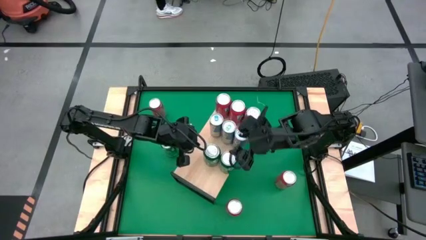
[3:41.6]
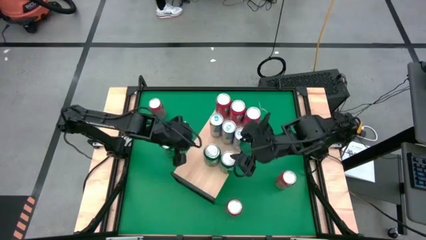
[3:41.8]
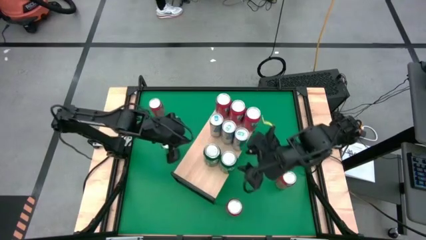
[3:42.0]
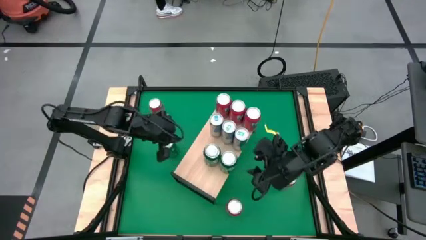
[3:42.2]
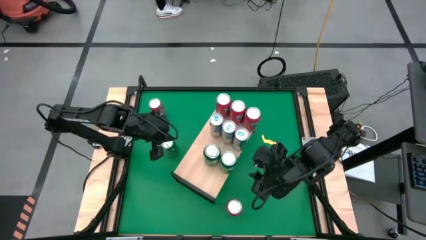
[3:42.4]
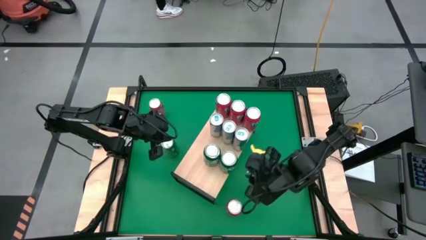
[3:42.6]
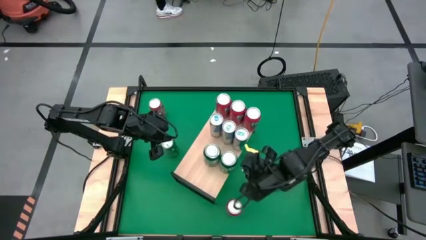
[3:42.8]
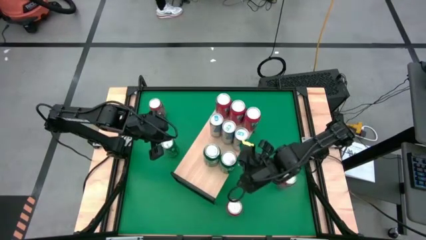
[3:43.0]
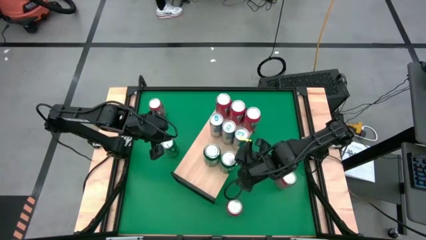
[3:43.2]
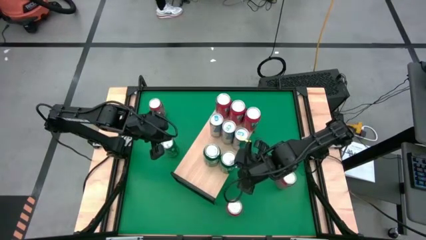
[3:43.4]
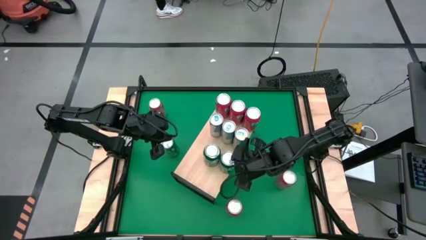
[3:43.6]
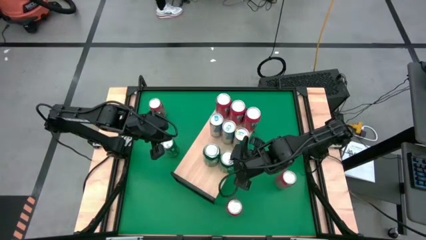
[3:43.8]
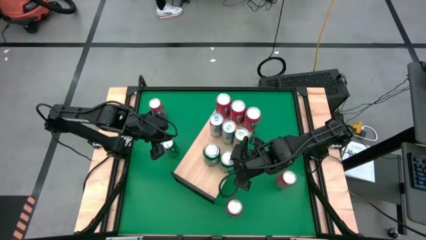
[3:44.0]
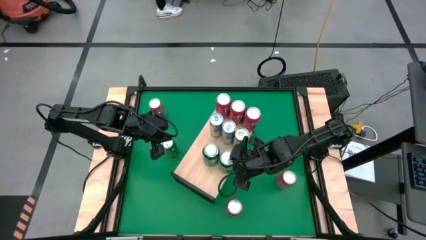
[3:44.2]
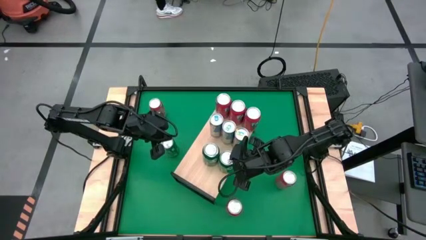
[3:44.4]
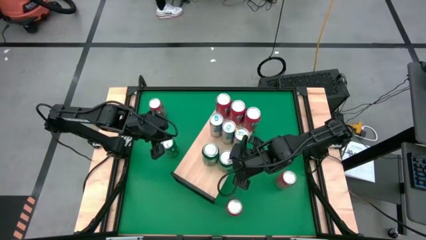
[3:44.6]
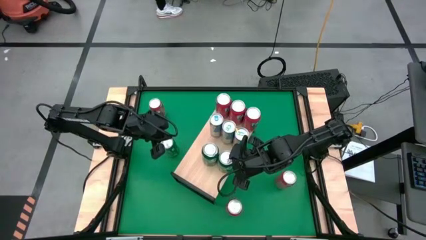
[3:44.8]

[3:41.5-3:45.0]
Task: Sort soda cans
Adjust the green soda cans on the shelf

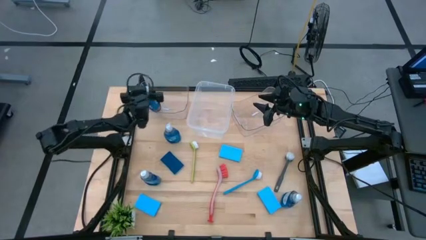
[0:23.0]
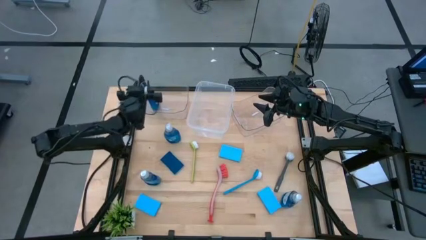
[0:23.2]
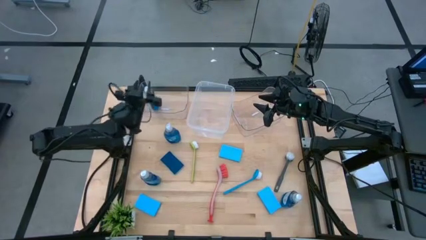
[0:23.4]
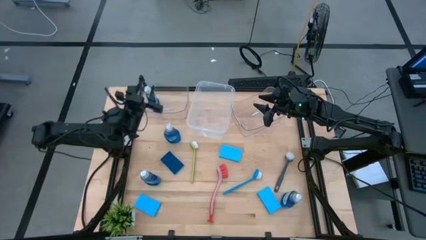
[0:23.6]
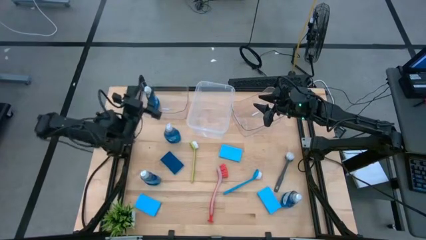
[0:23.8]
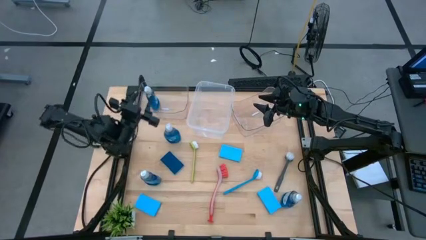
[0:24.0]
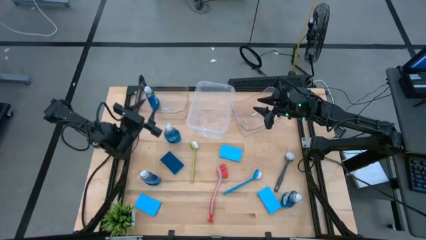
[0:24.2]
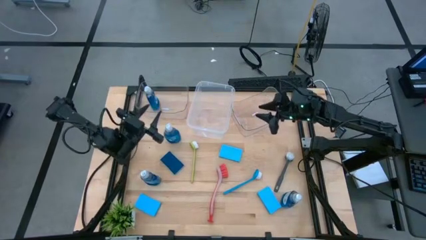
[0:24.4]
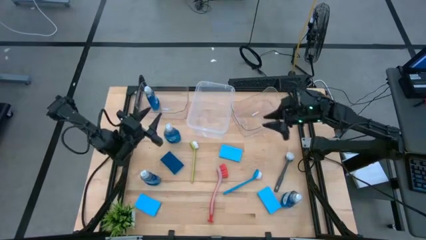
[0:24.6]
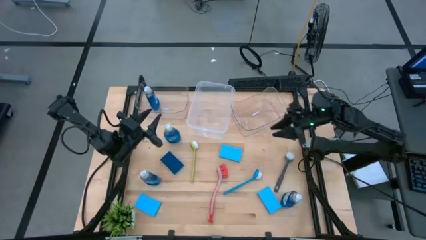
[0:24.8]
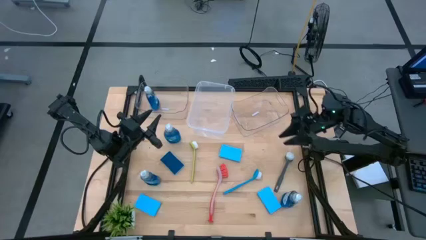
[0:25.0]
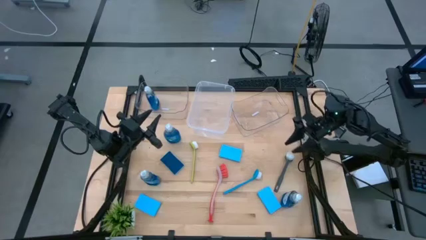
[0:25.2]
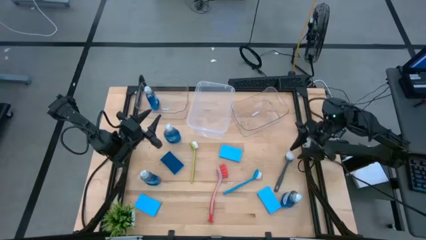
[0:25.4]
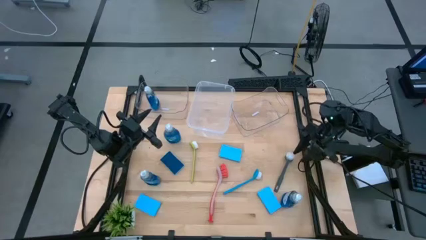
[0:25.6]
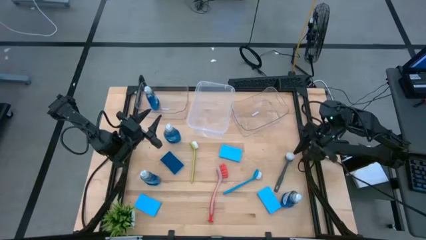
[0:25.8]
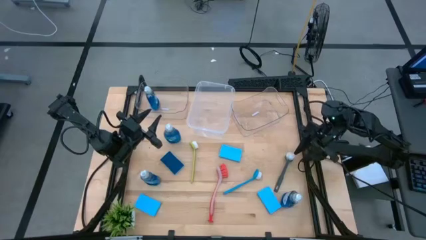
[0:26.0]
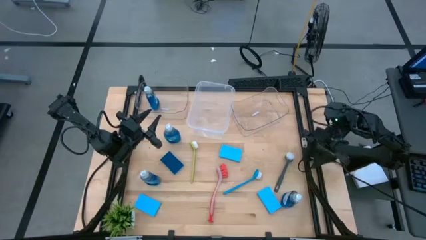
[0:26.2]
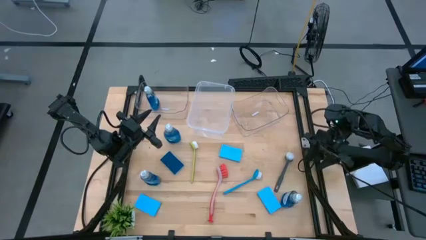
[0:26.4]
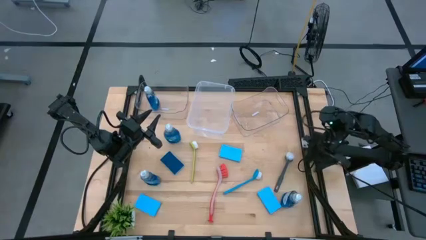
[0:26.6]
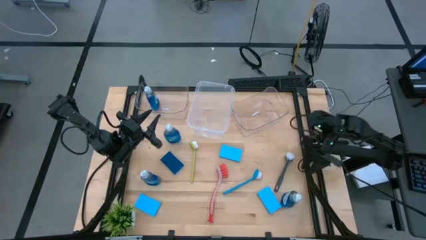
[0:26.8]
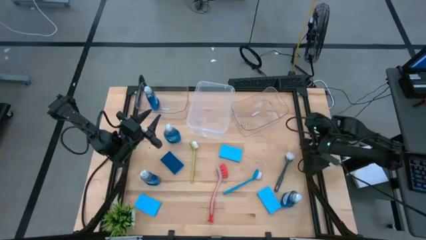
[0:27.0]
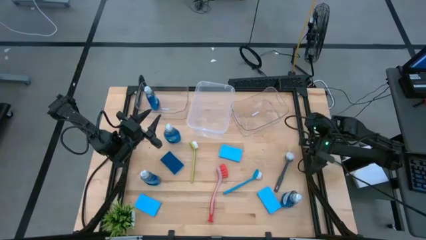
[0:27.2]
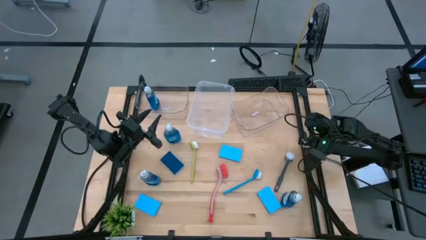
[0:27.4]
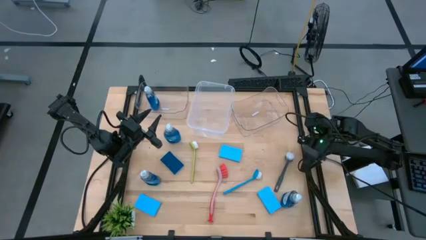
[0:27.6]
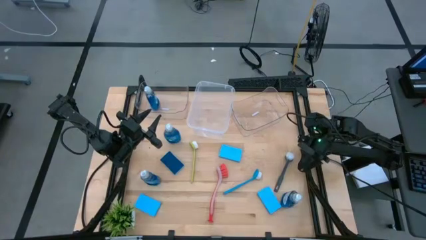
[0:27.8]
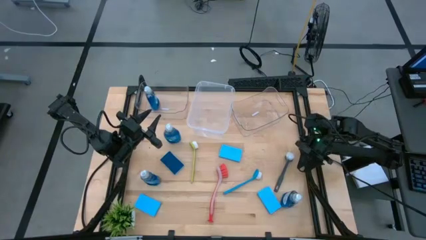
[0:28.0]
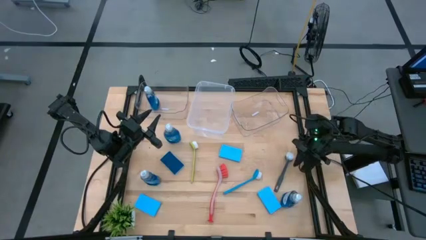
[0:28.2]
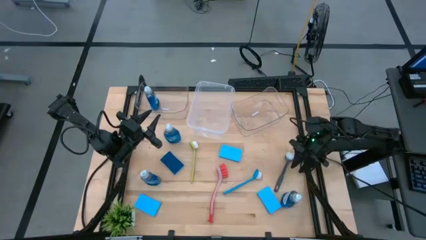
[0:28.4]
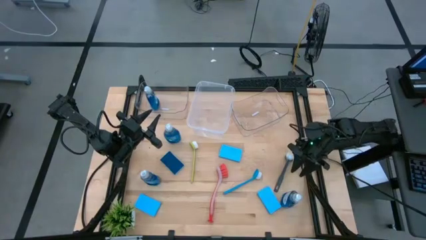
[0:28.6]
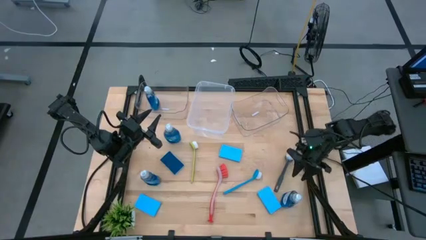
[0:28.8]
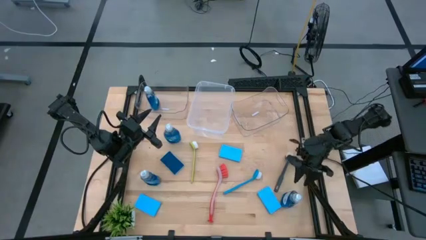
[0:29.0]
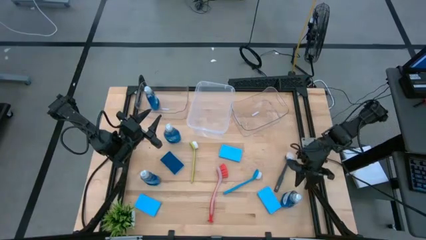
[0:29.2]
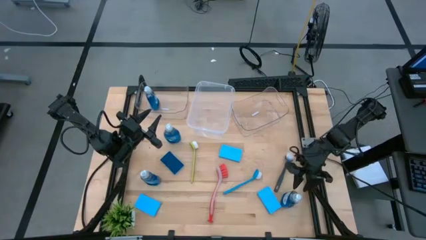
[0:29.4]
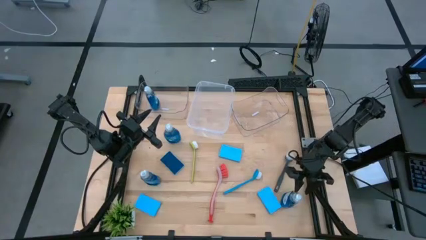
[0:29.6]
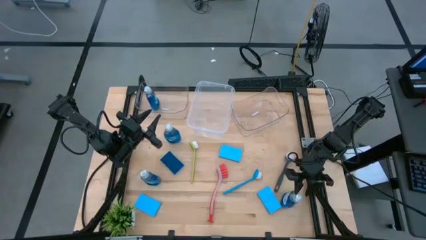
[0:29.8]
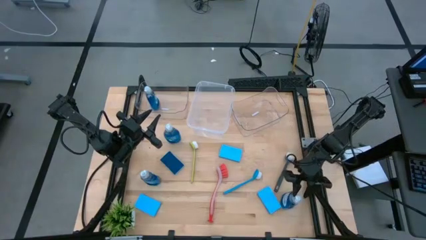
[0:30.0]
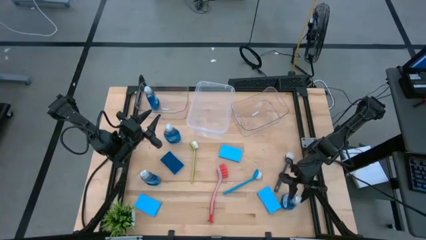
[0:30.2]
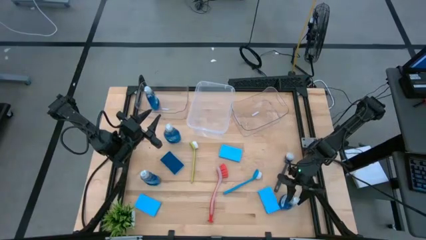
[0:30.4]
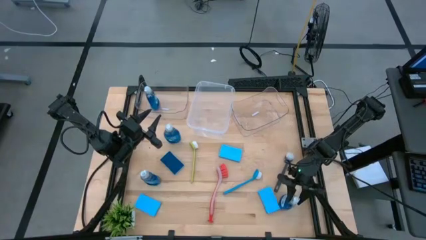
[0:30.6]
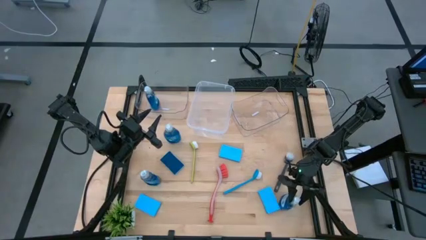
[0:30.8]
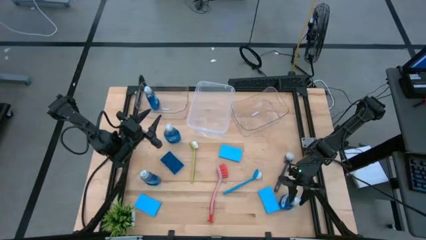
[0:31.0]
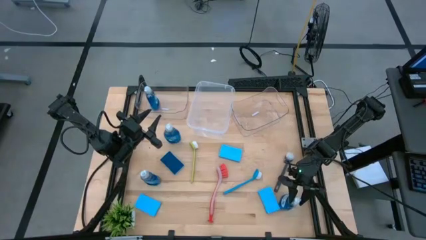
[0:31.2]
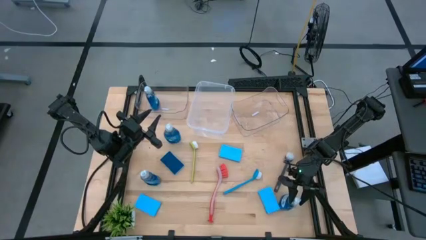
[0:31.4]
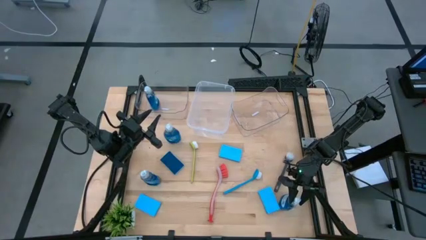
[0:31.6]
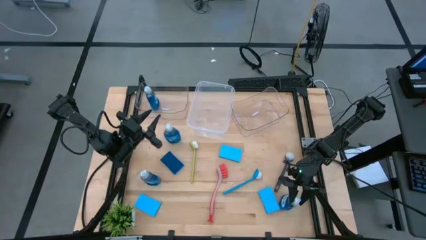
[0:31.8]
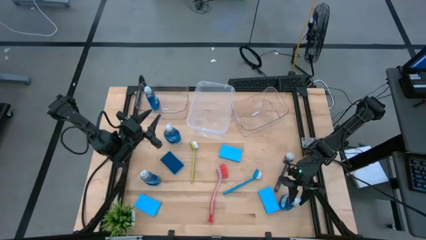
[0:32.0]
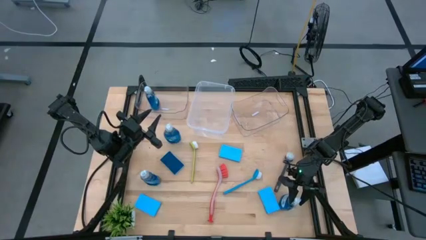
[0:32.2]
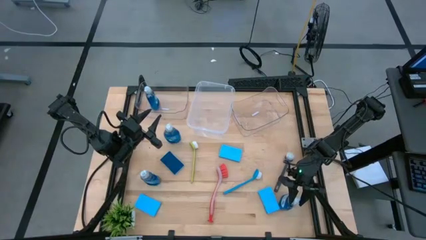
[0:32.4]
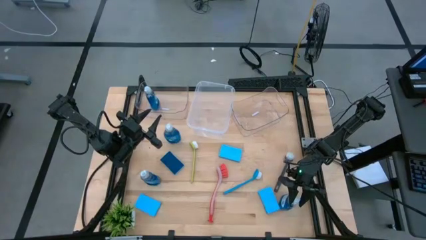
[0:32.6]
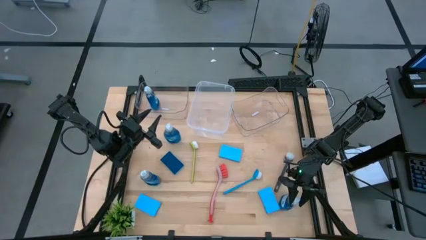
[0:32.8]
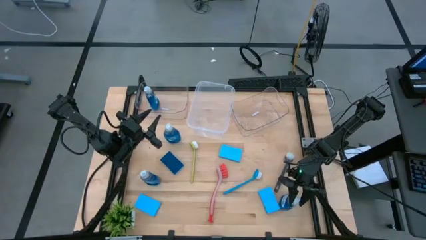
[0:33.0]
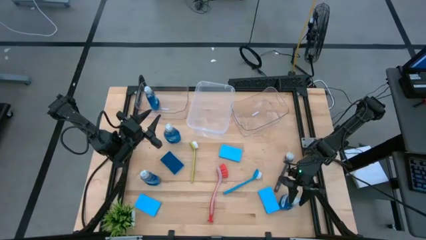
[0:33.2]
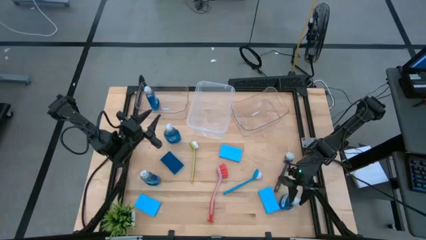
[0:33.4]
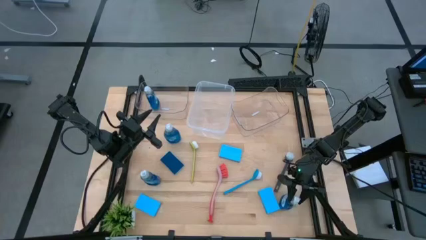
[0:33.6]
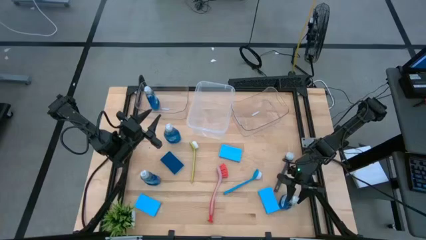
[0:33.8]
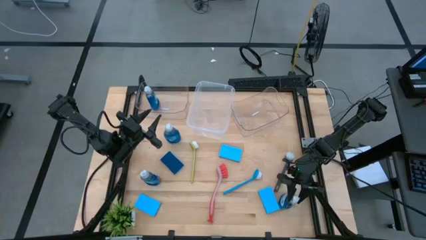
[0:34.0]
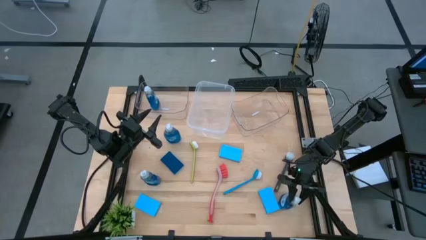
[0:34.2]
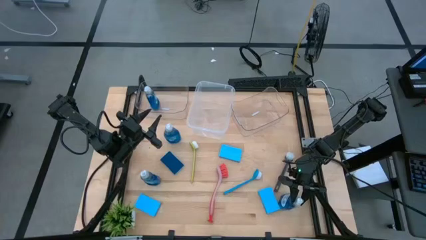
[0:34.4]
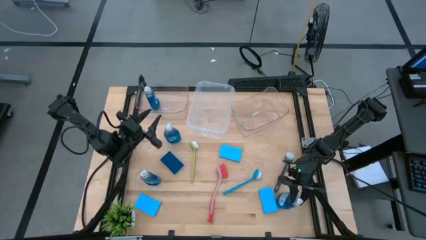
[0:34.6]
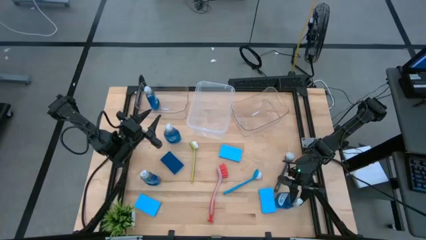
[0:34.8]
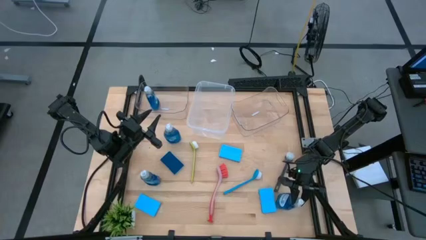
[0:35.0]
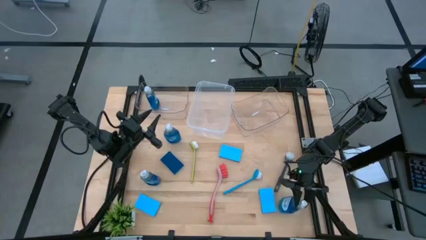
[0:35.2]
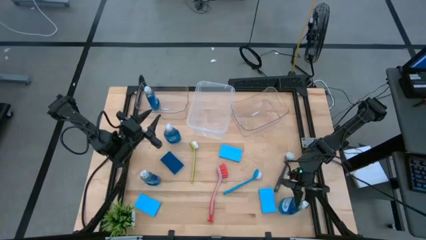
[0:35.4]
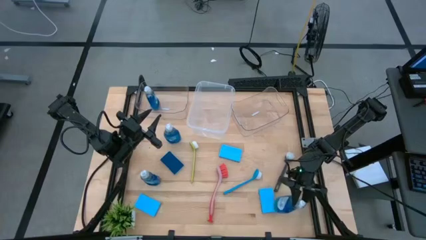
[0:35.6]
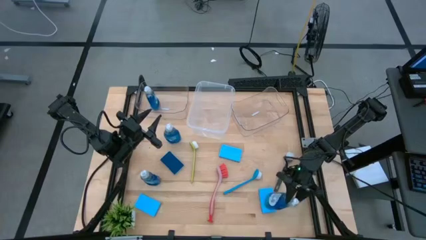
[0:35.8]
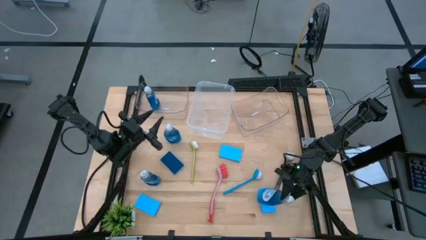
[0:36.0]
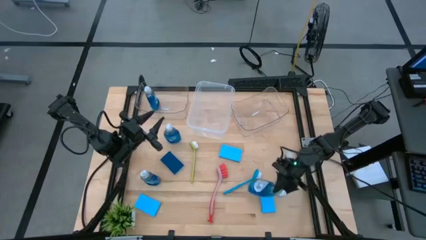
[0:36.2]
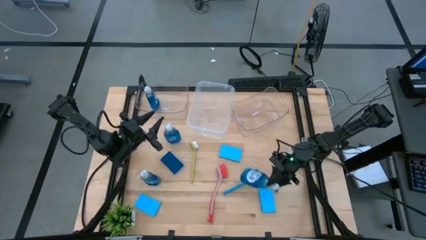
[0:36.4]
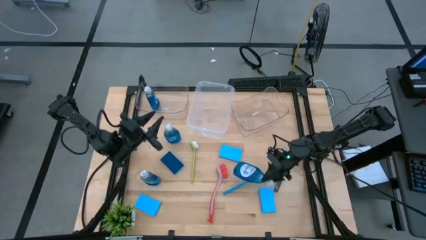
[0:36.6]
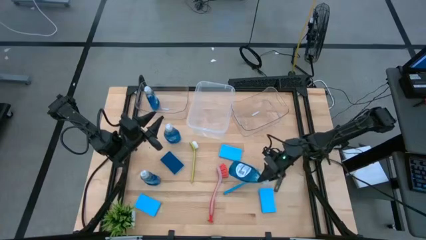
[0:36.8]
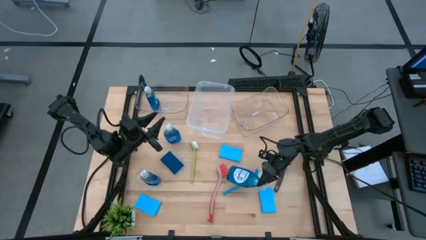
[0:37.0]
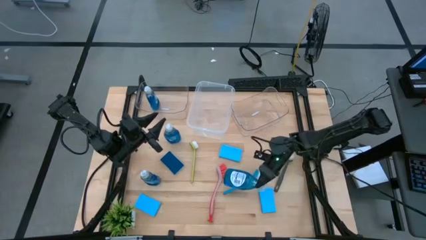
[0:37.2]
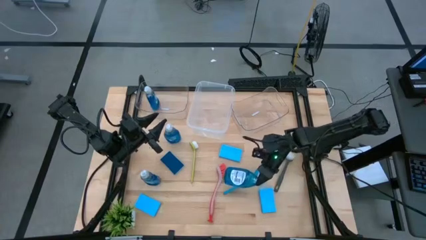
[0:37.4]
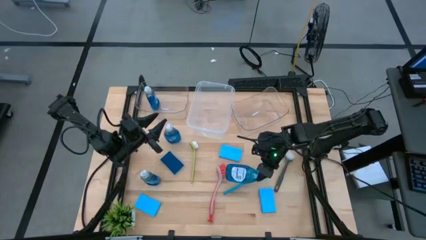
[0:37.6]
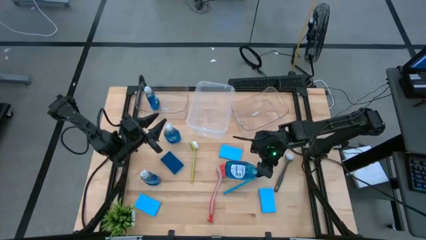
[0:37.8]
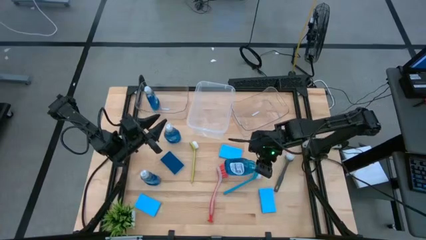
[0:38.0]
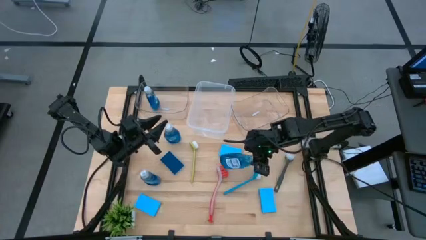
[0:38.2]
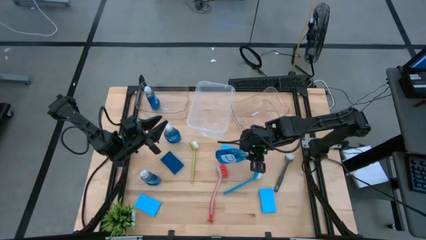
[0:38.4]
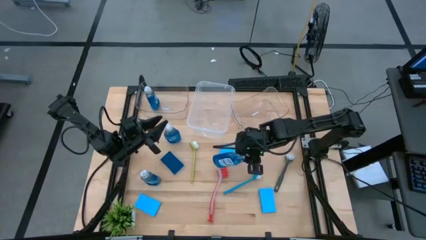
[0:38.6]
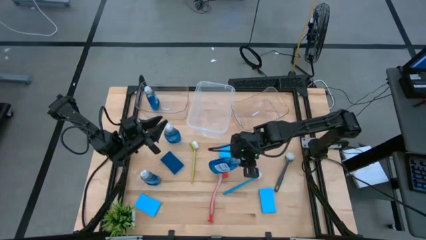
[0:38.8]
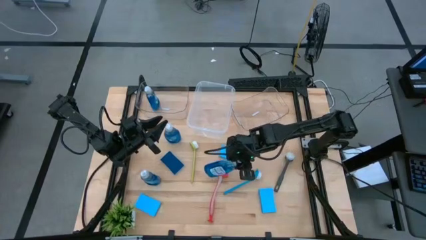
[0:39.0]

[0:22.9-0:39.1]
Task: Pick & Place Kitchen Sink Supplies
Put the dish soap into the left transparent bin
